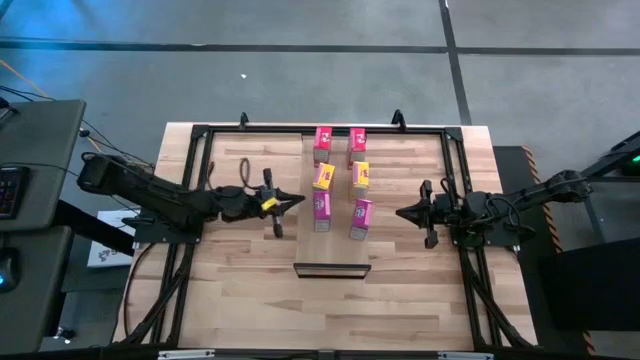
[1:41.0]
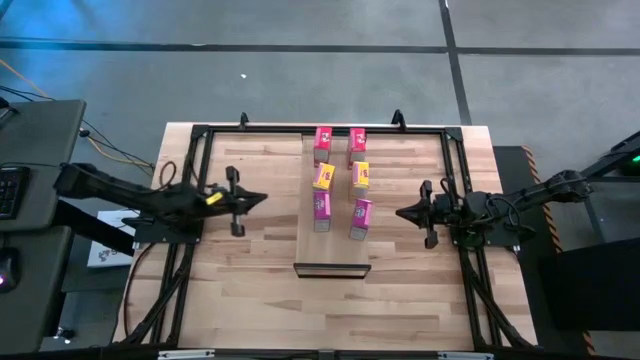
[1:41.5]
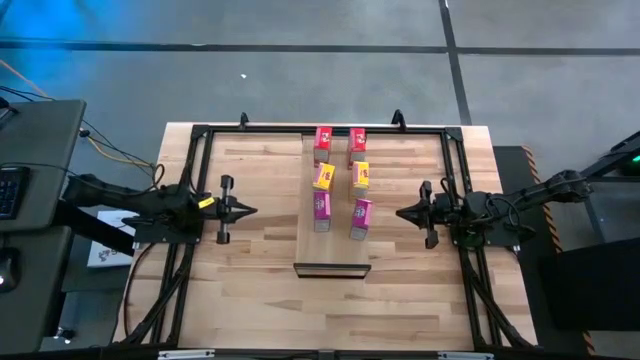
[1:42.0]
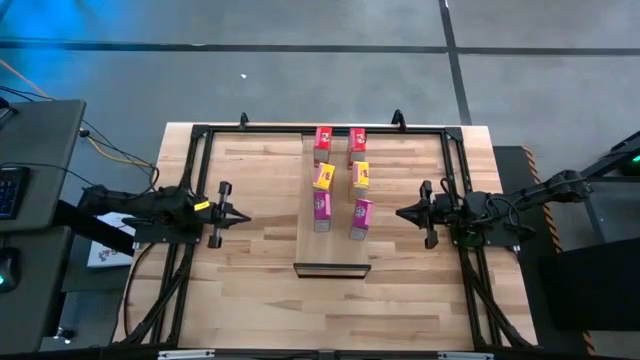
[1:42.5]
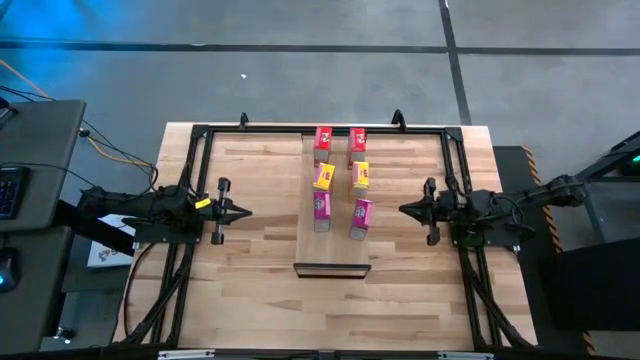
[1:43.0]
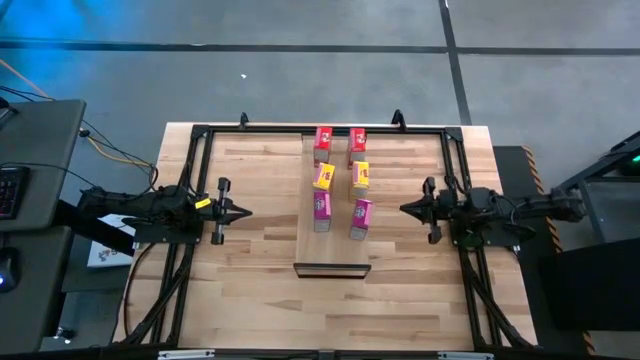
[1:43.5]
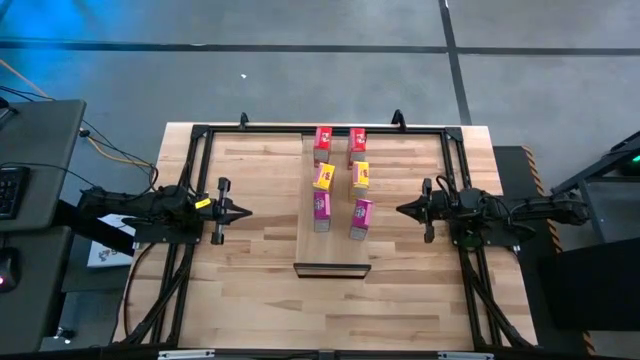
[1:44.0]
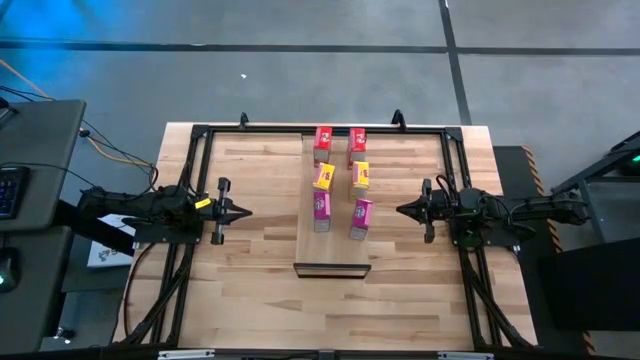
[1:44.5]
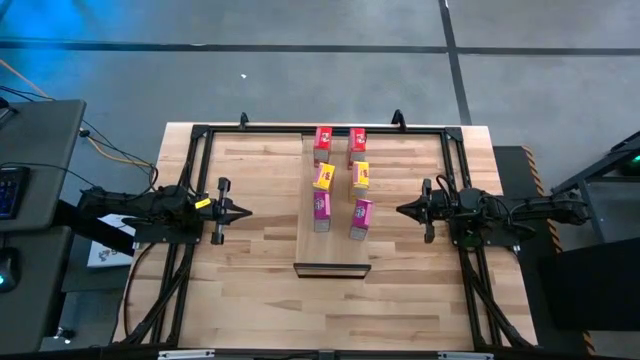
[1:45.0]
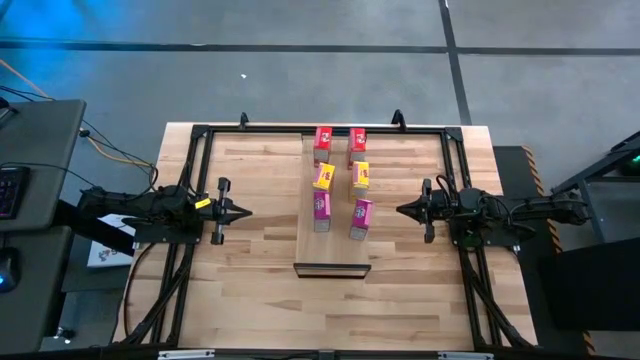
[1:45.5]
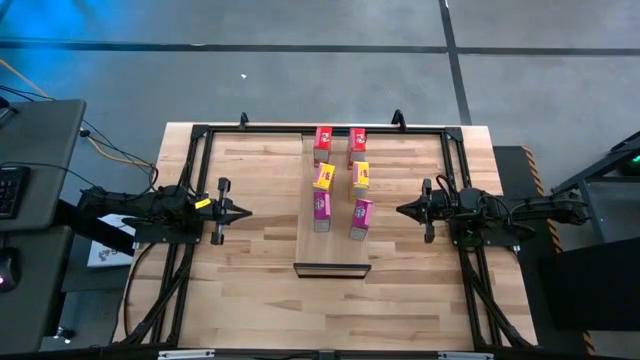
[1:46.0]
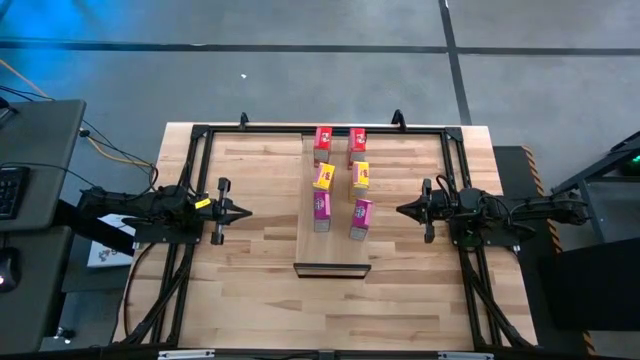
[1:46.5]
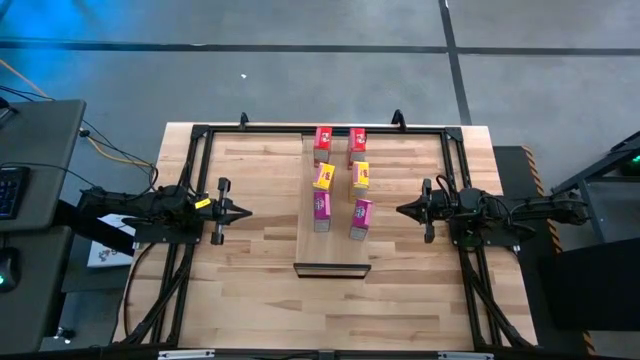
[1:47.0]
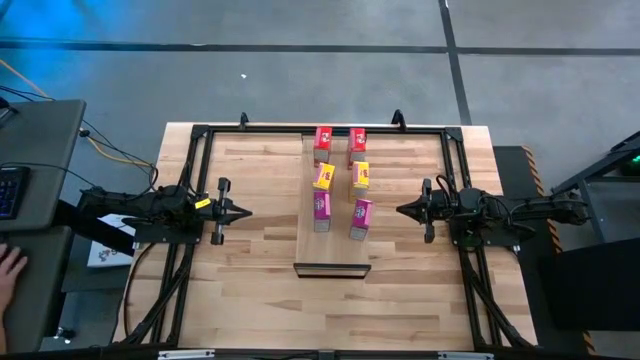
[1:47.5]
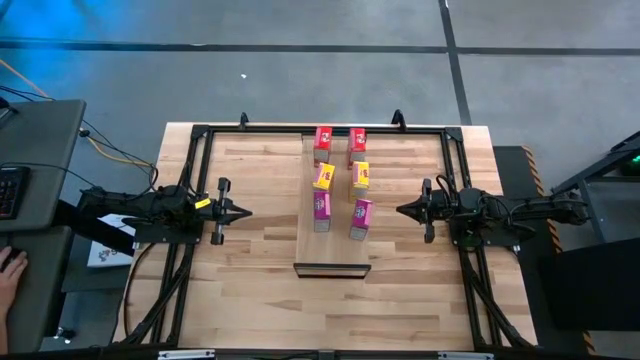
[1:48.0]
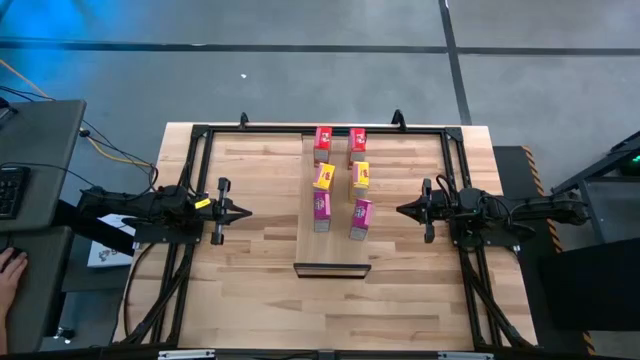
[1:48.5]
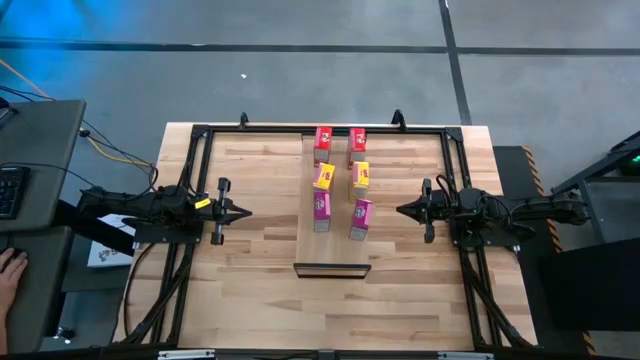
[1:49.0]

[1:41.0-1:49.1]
Task: Stack cereal on shelf
Return to Home Position

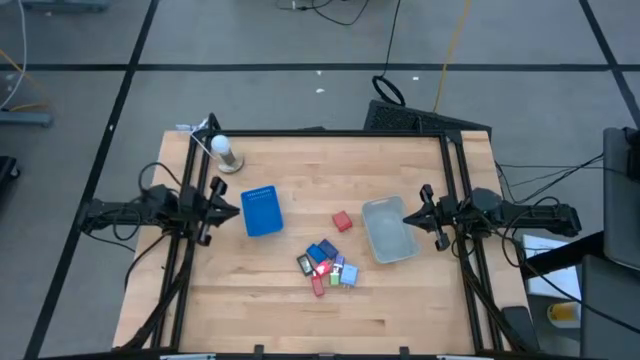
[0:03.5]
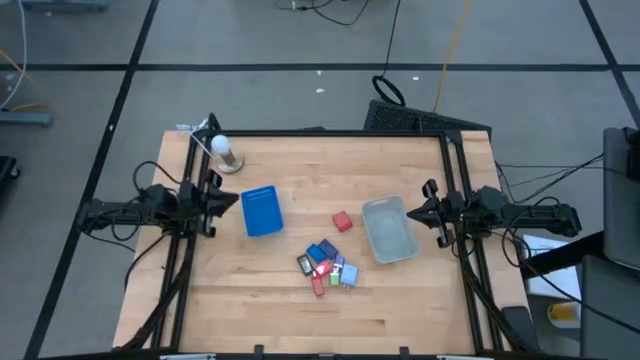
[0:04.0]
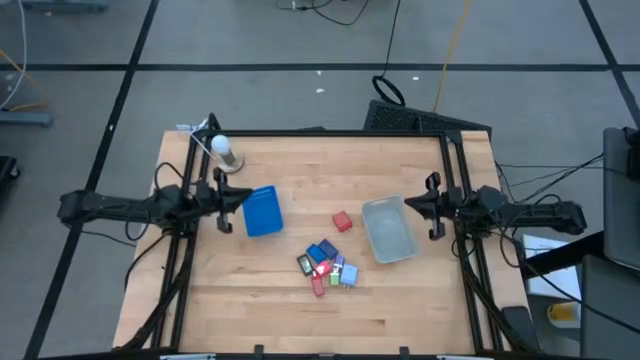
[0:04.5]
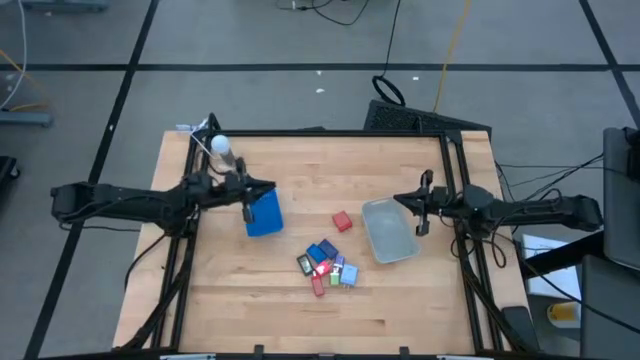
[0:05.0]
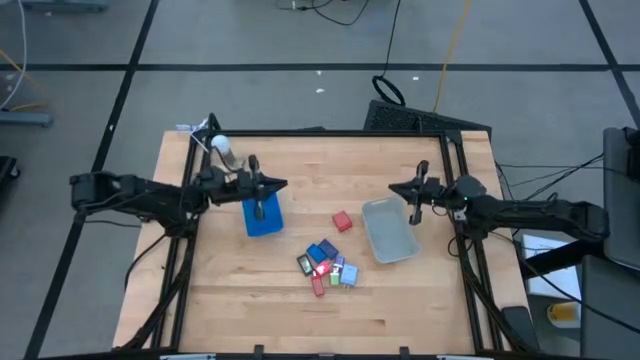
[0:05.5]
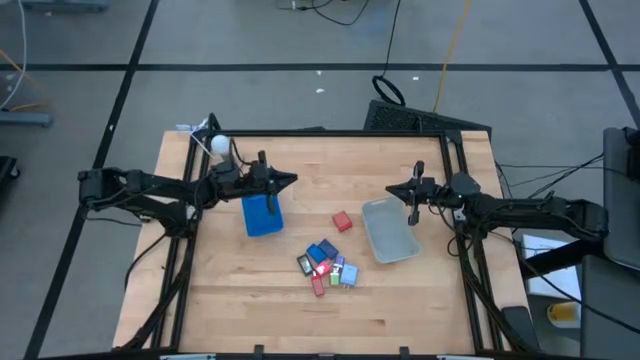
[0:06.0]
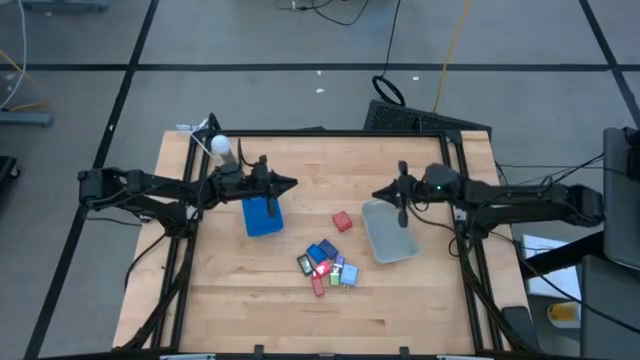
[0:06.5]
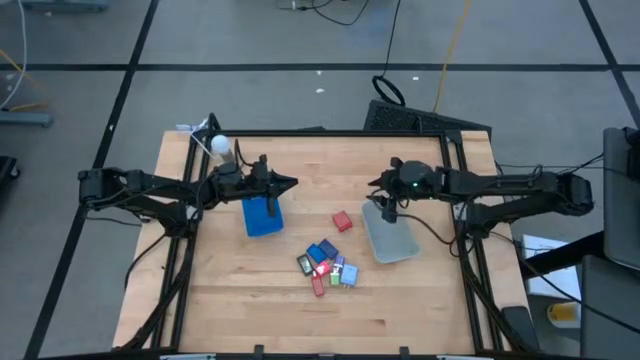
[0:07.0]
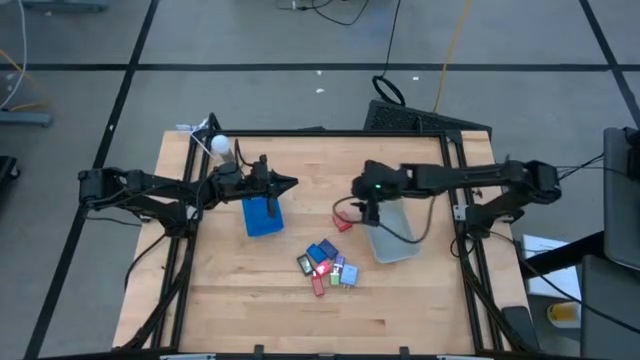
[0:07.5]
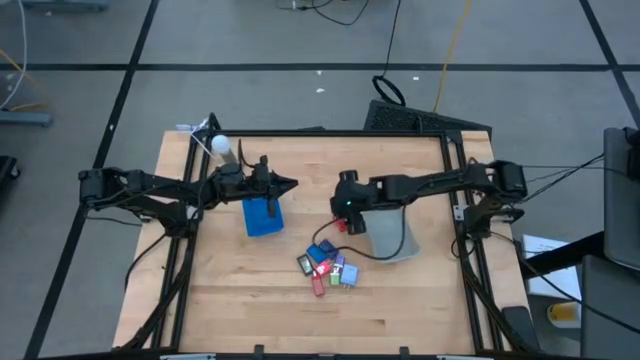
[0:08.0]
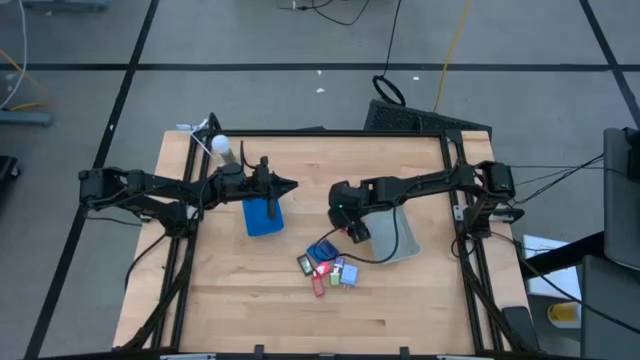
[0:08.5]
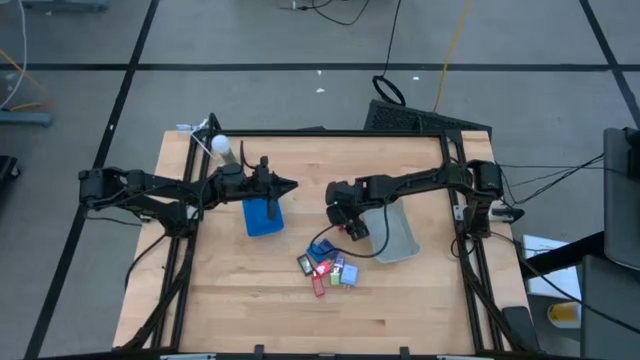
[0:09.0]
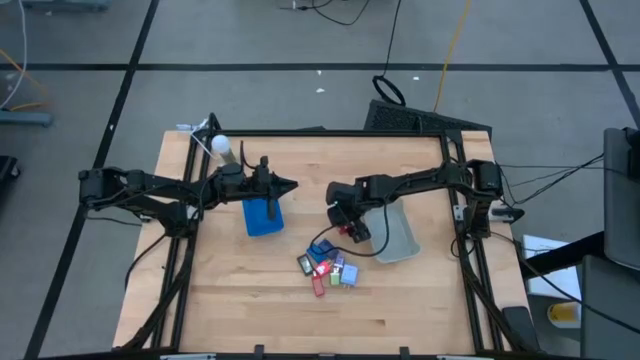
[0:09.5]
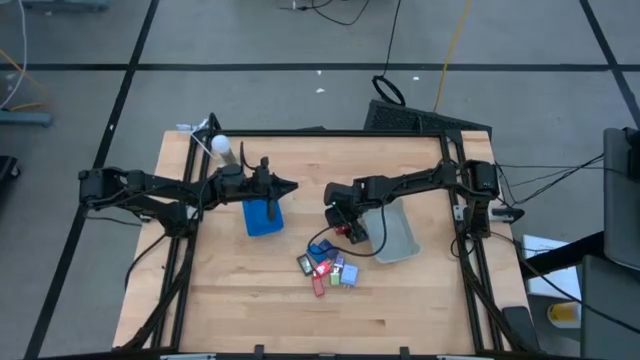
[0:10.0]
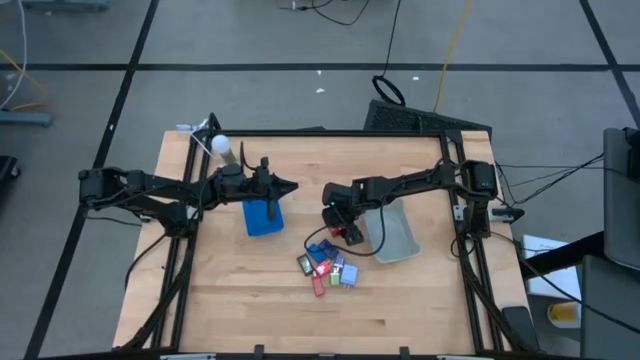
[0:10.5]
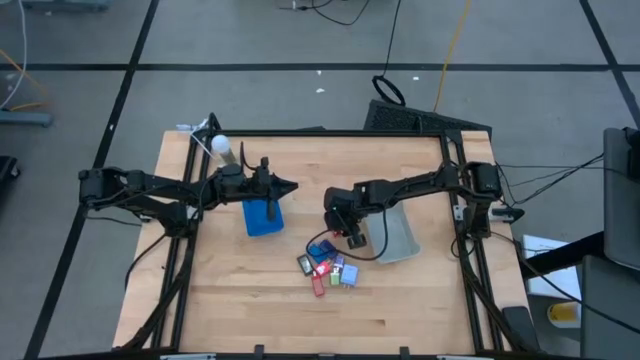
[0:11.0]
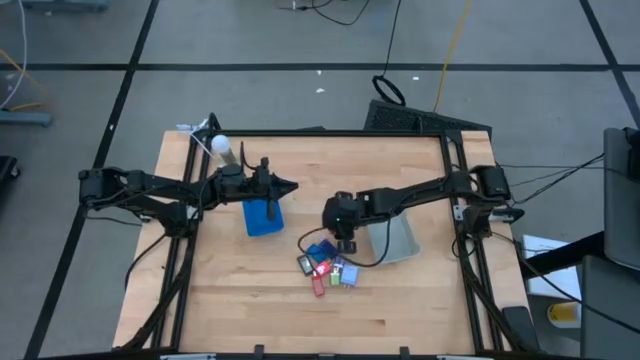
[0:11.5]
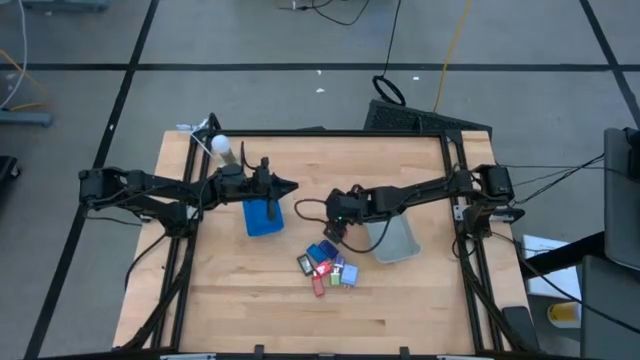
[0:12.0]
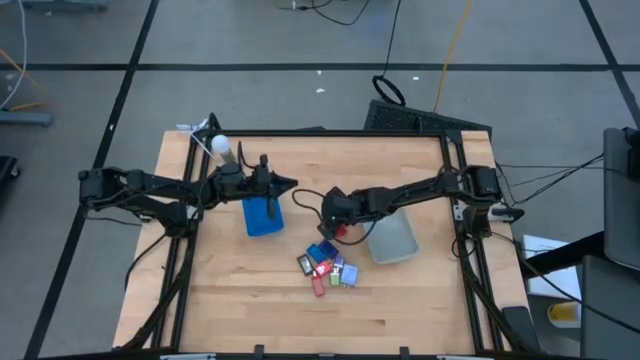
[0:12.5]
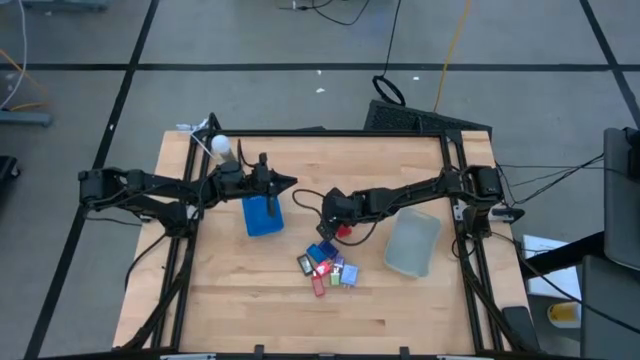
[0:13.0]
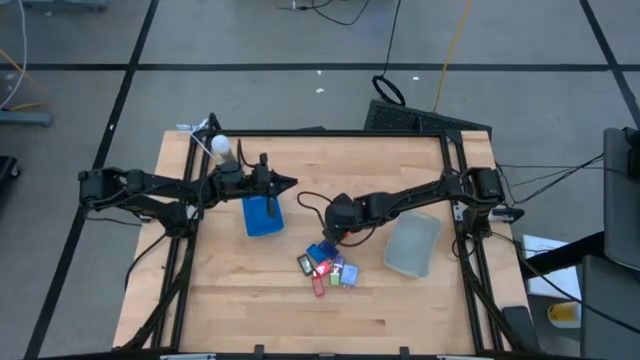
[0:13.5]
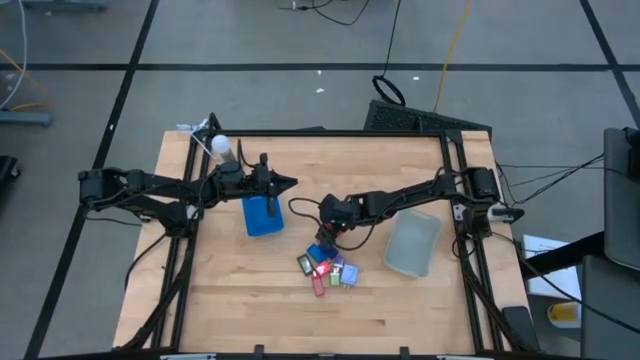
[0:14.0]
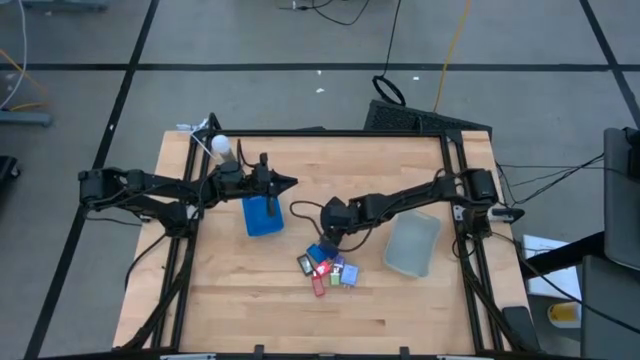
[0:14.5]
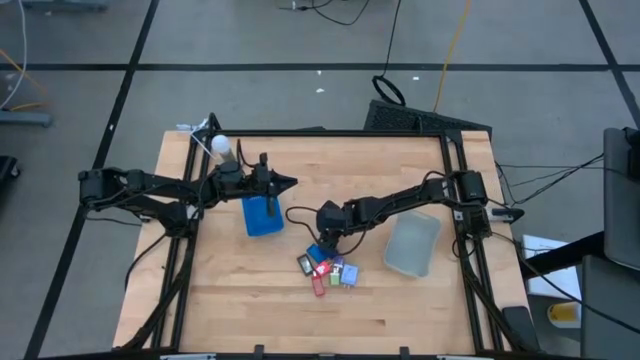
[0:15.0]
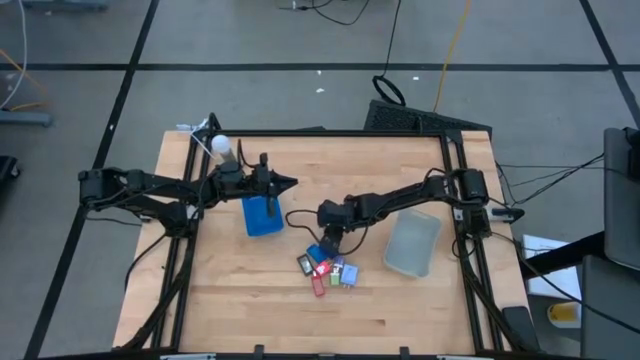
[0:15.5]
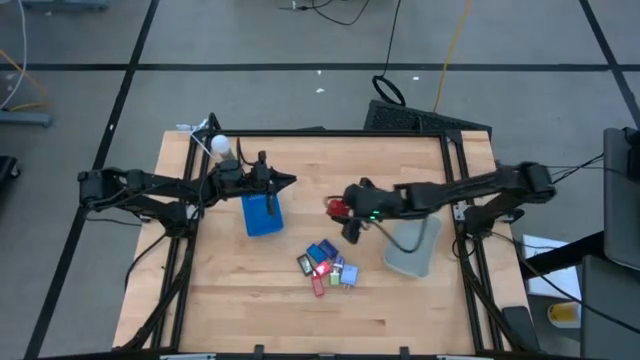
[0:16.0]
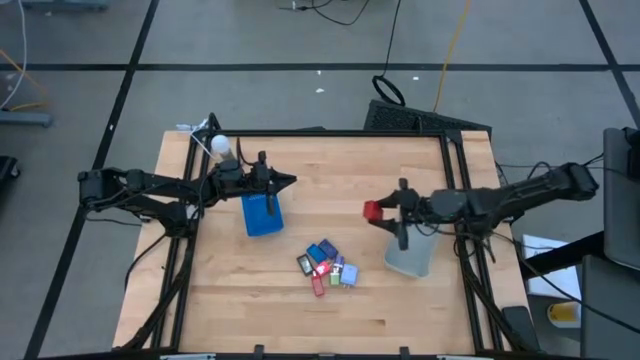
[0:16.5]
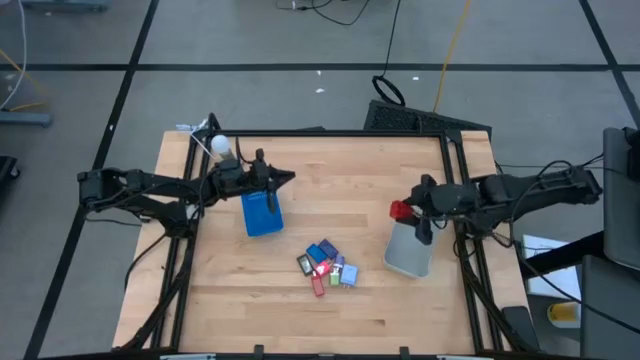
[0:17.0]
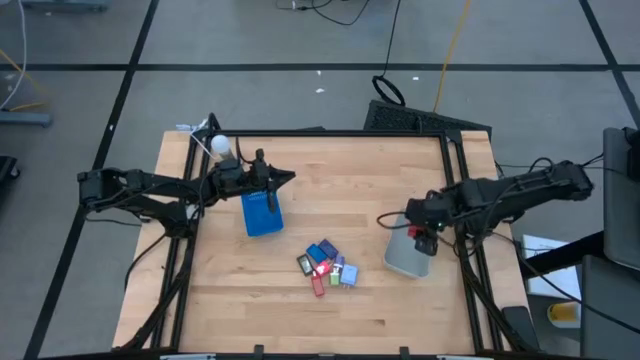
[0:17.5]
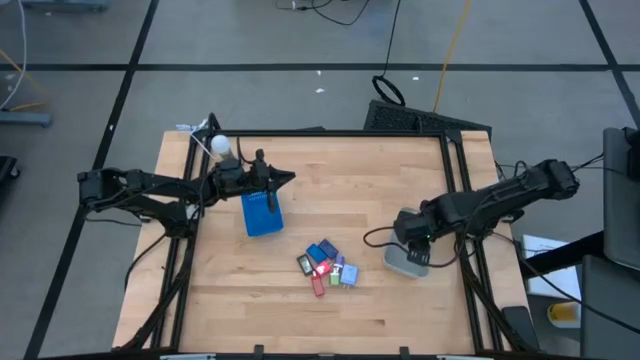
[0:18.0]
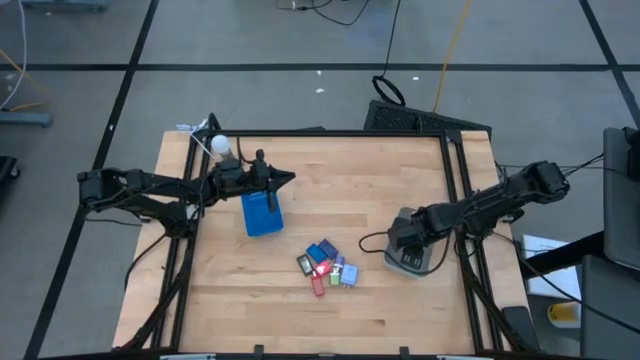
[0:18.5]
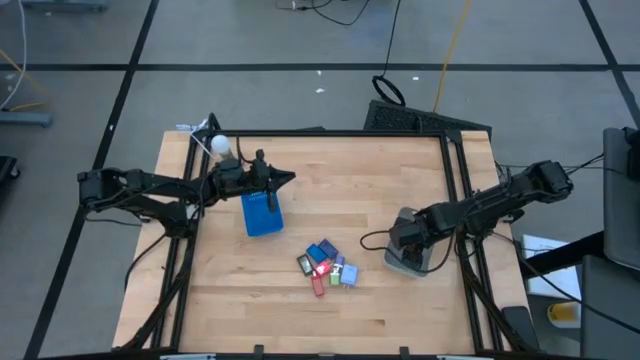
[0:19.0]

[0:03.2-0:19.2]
Task: Pick & Place Office items
Put the red charger adapter into the grey bin
